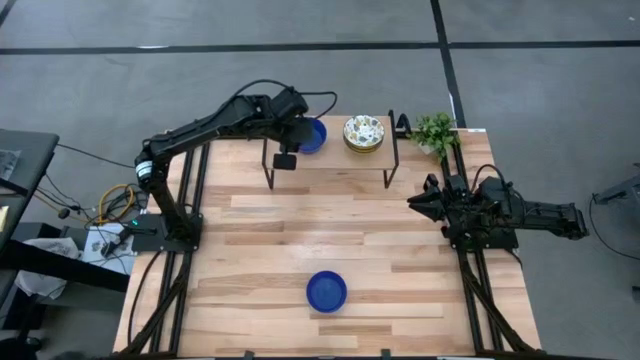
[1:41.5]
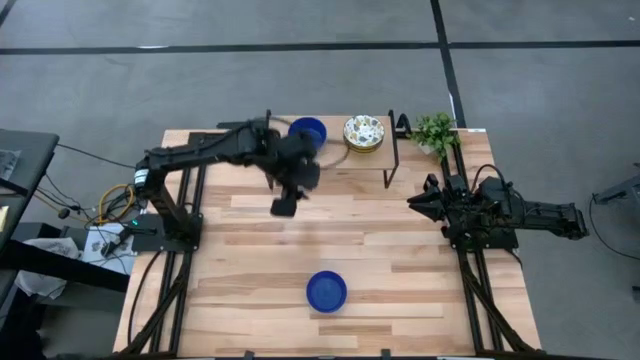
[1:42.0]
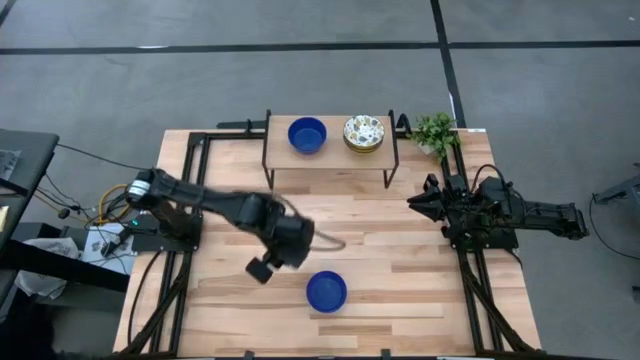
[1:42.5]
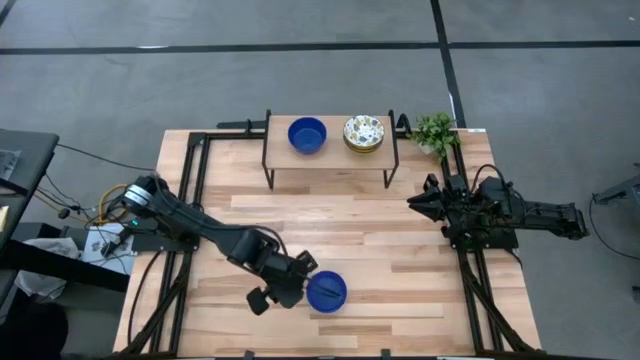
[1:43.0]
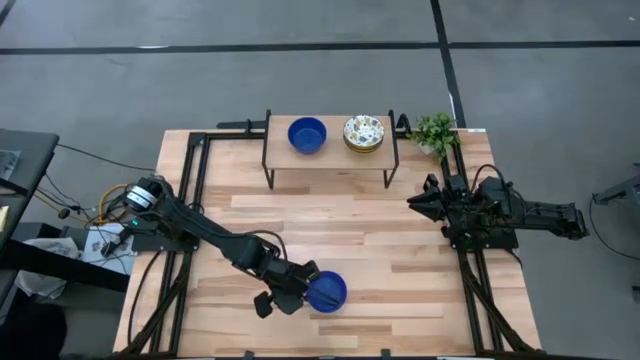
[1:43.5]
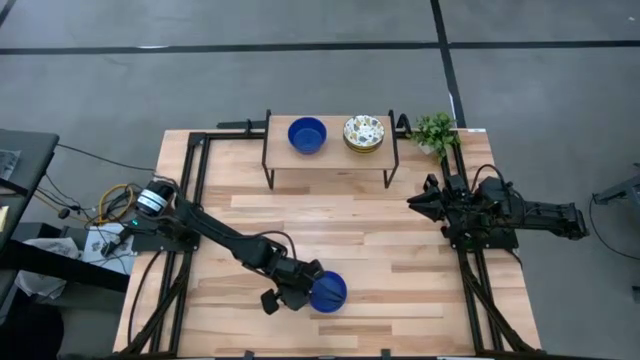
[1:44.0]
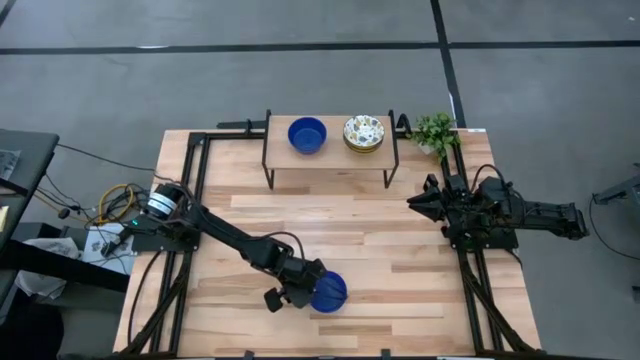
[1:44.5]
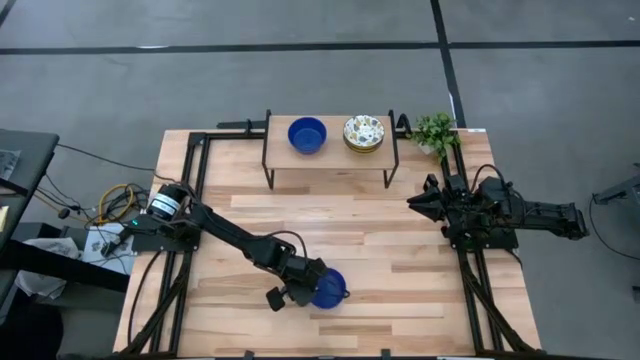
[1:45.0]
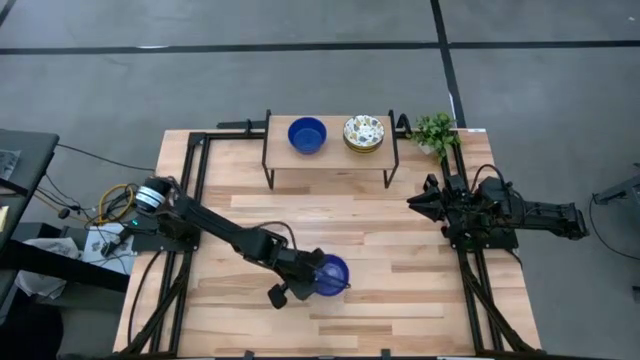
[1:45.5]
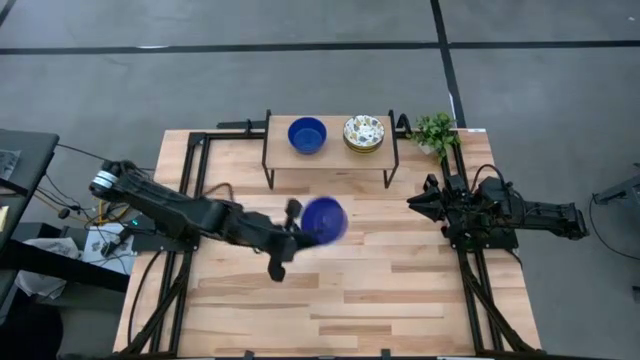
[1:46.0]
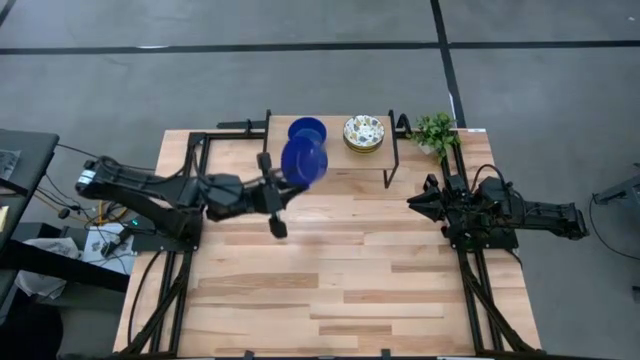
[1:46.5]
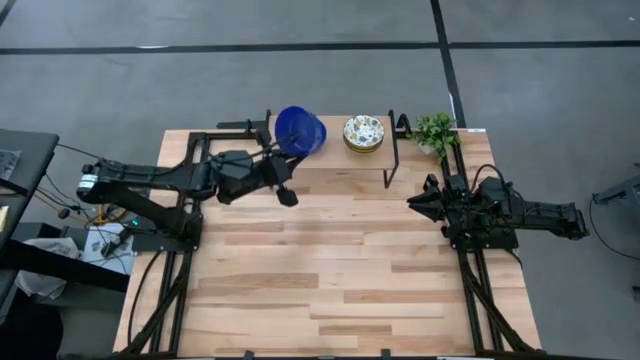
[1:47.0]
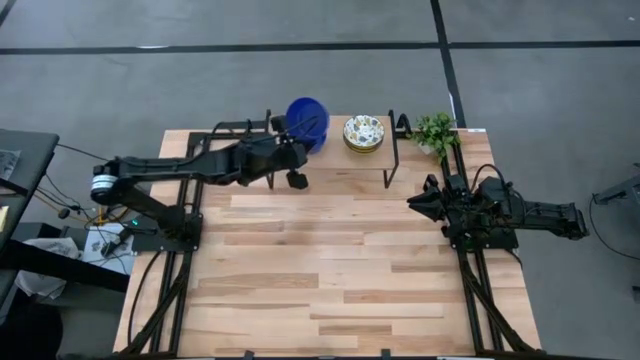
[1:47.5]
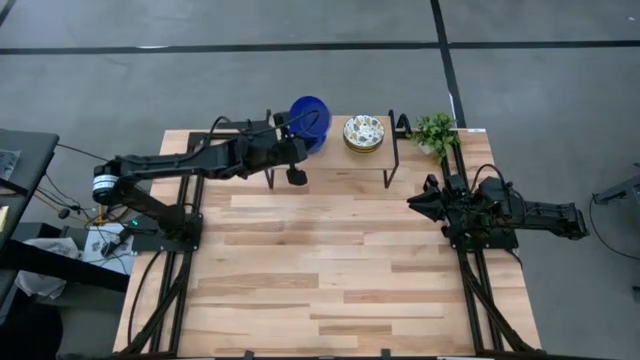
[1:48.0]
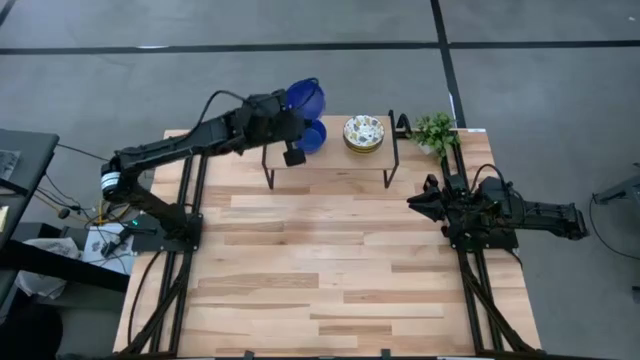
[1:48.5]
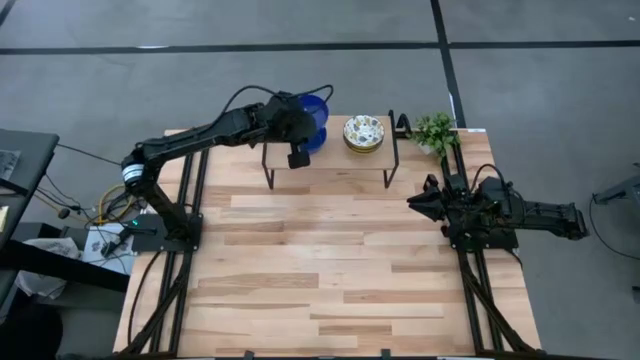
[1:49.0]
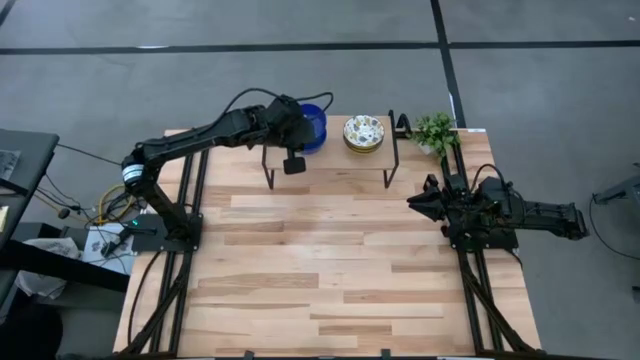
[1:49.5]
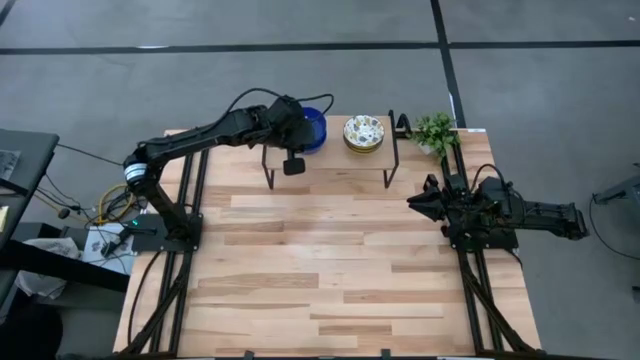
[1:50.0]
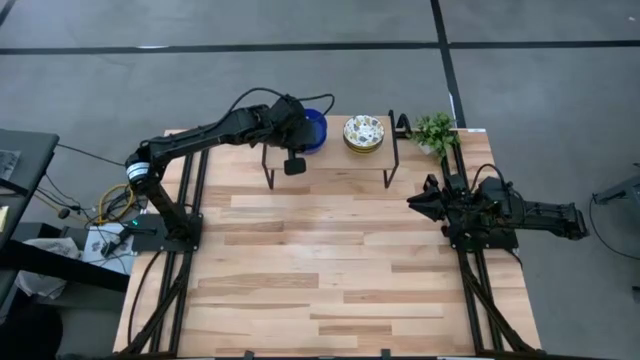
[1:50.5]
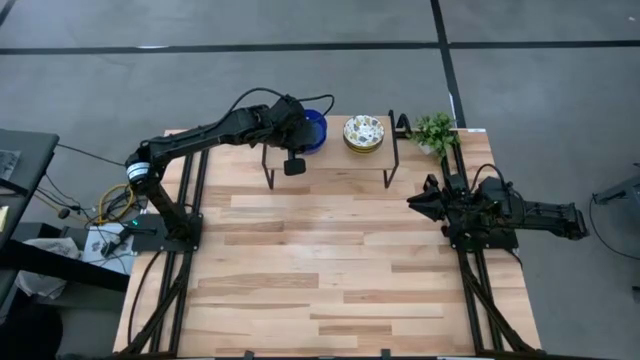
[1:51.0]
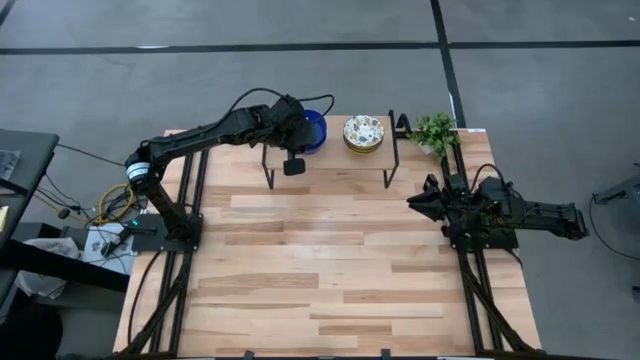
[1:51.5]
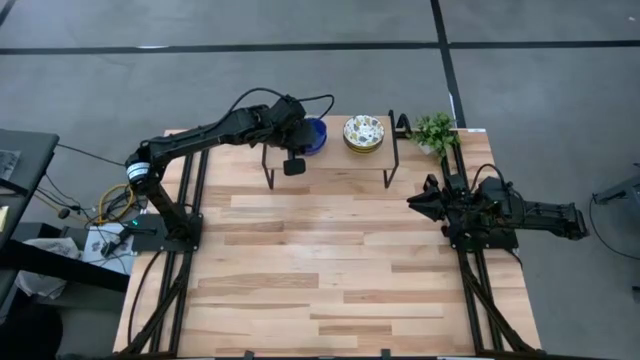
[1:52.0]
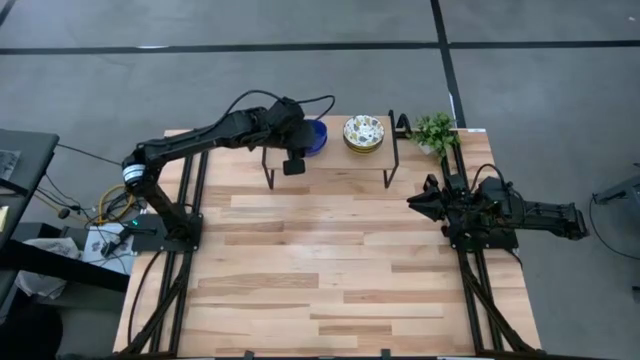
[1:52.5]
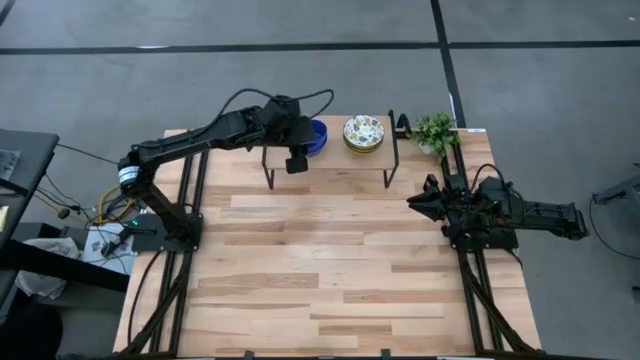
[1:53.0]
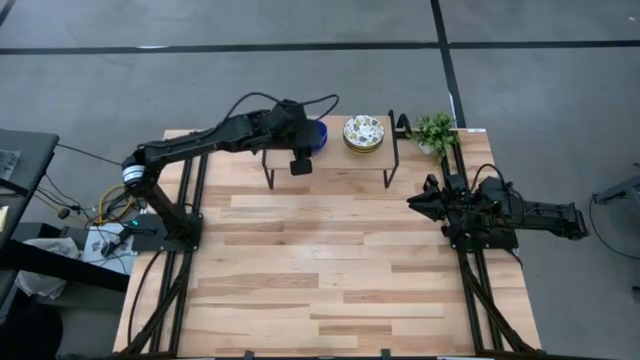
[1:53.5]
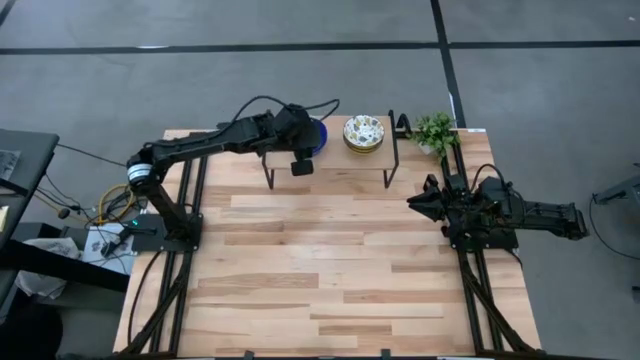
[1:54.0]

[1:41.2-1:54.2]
Task: Pick & Place Mini bowls
Stack the blue bowl on top of the blue bowl on the shelf

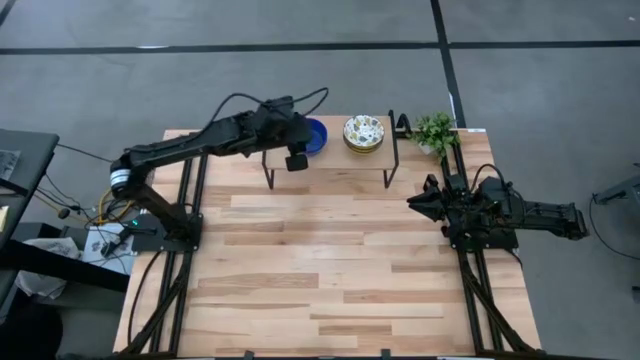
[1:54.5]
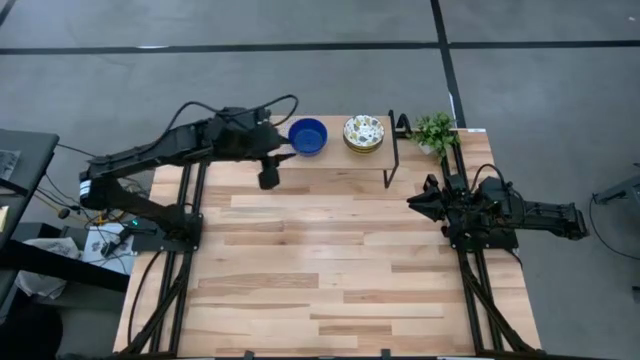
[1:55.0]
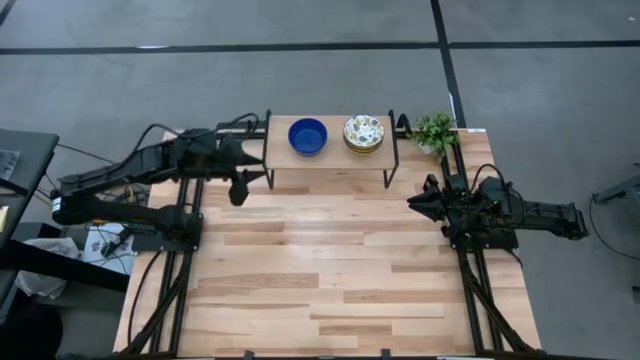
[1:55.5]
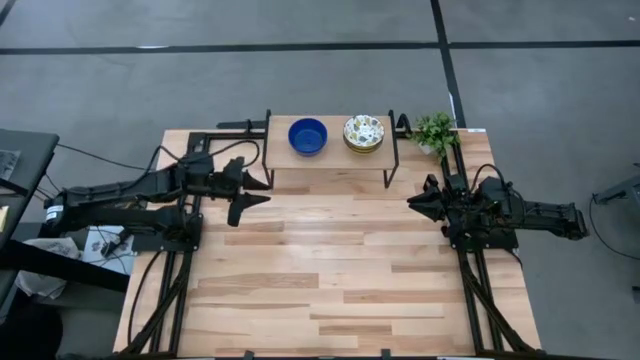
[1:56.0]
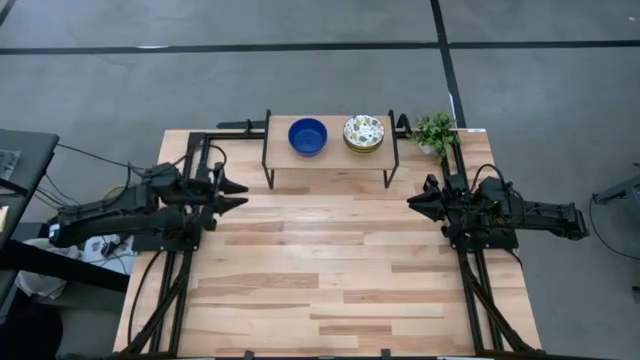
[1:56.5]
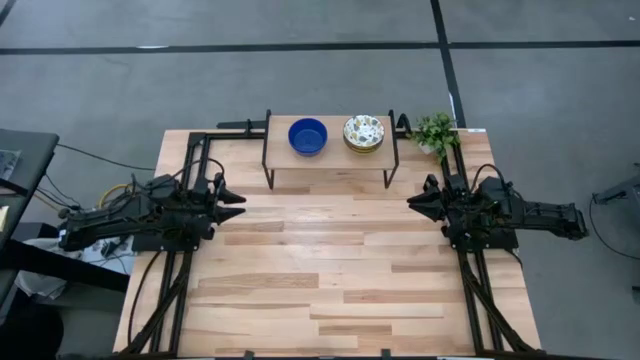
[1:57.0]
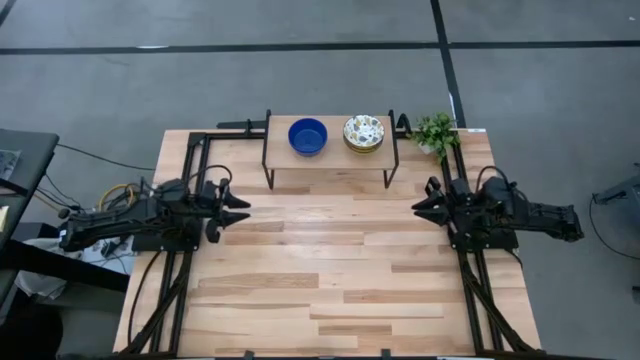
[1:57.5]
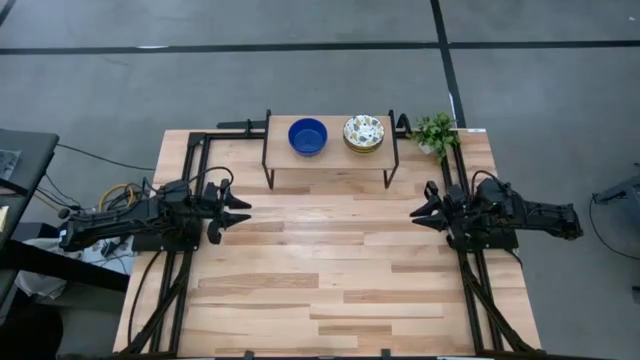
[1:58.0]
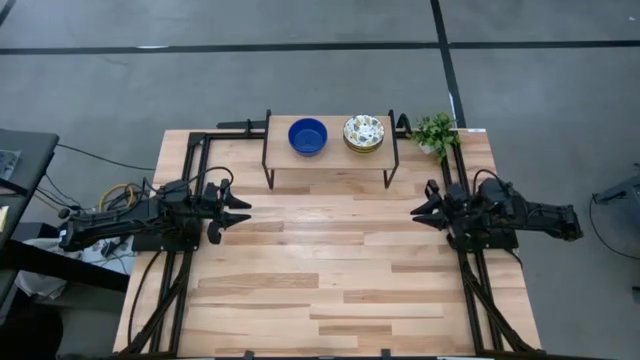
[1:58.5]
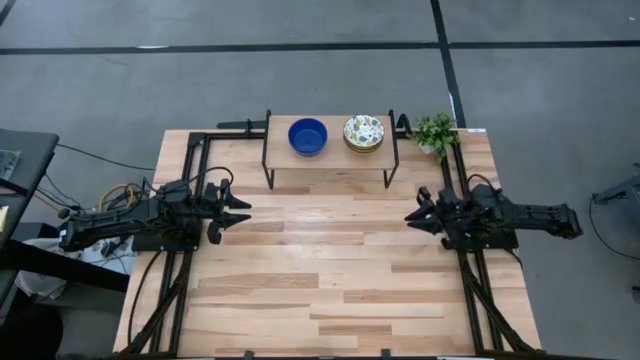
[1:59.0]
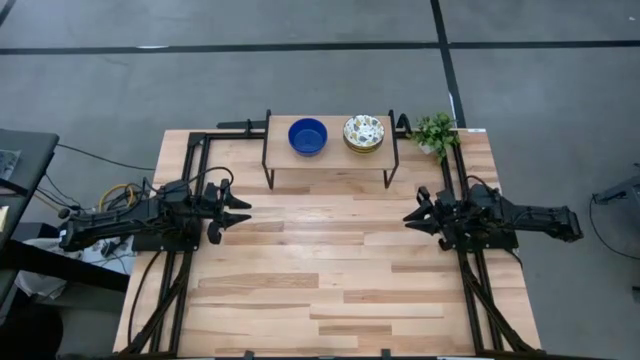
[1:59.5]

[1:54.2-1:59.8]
Return to Home Position

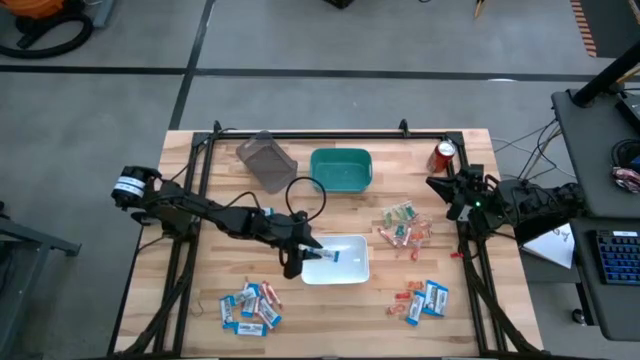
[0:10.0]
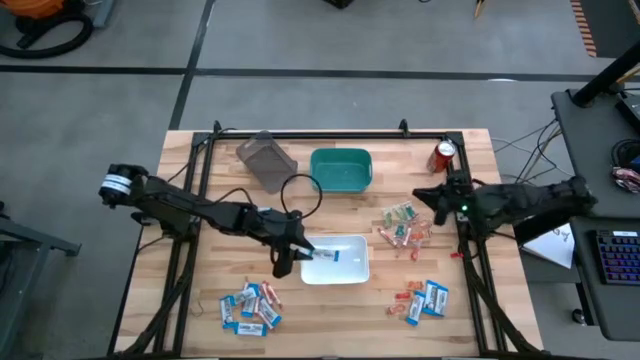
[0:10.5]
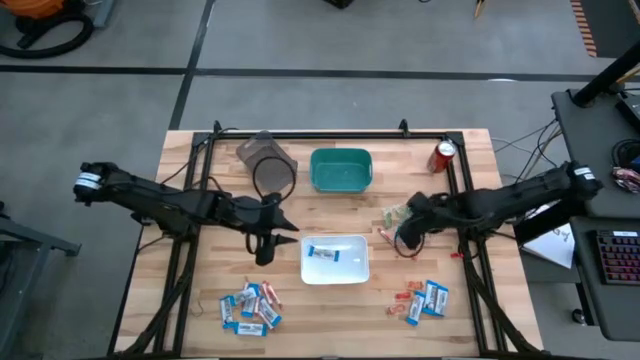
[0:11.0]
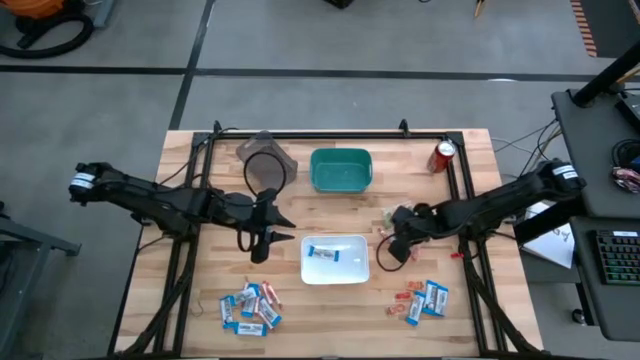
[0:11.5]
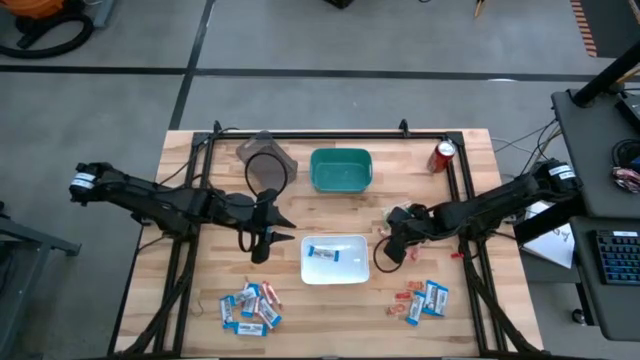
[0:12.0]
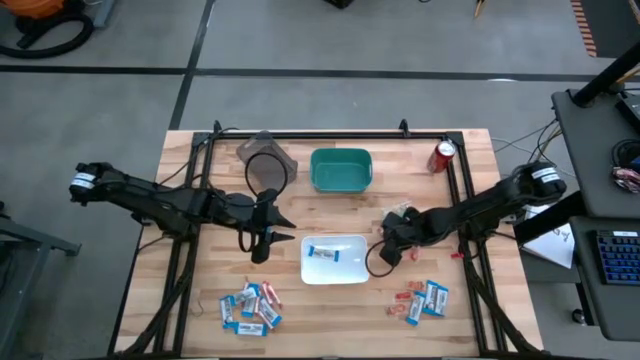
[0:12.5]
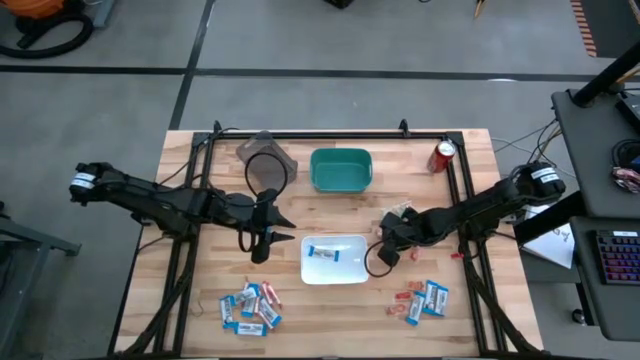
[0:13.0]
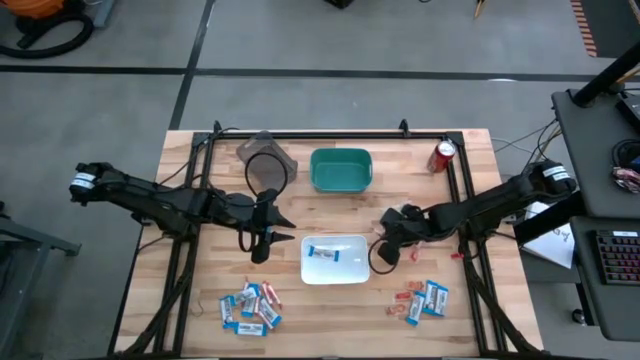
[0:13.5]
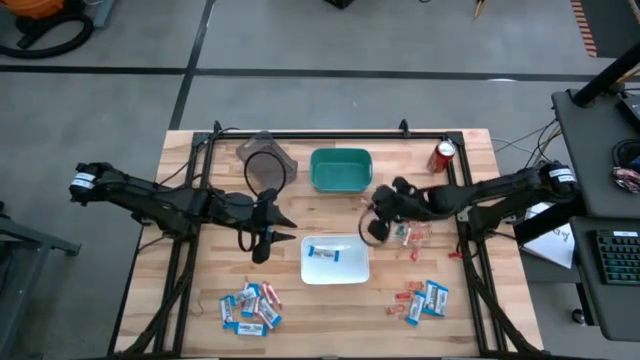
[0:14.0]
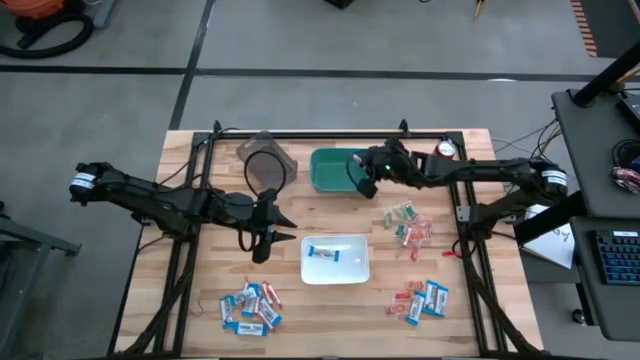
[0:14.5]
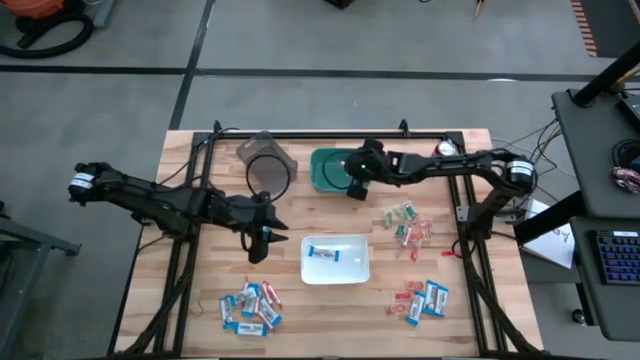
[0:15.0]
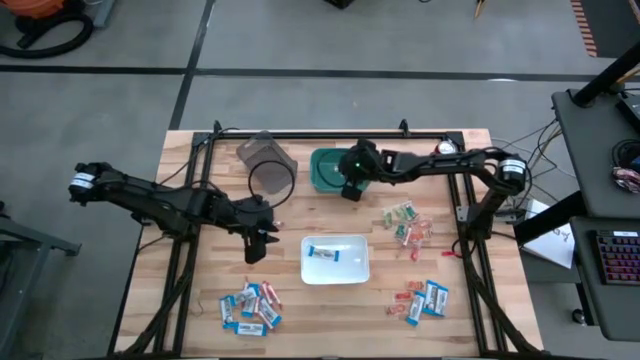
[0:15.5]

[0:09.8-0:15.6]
Task: Sort candy
Put the white candy into the green bin
